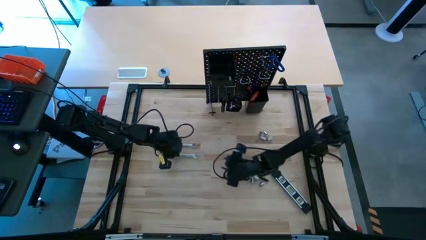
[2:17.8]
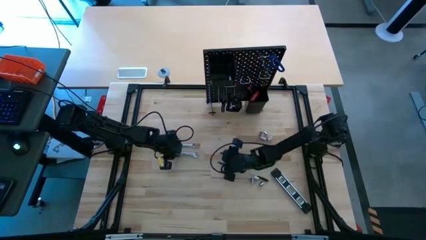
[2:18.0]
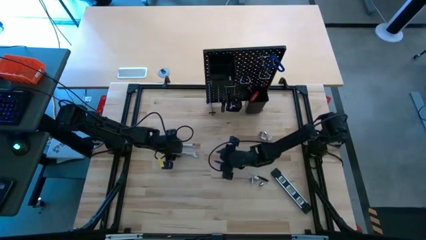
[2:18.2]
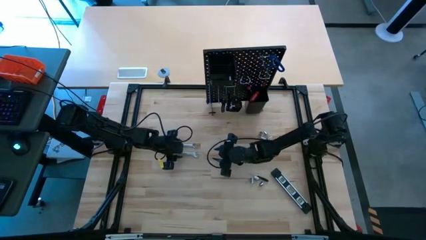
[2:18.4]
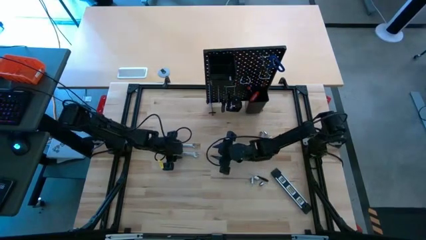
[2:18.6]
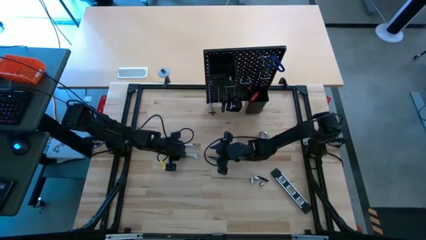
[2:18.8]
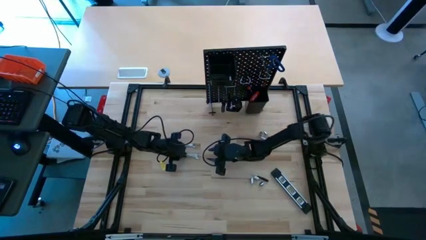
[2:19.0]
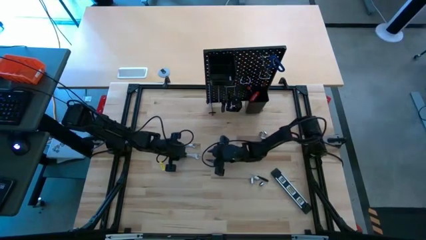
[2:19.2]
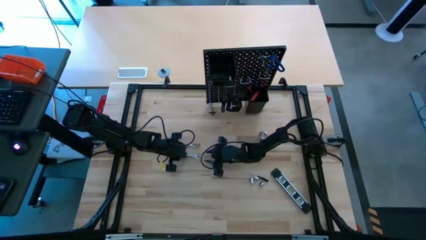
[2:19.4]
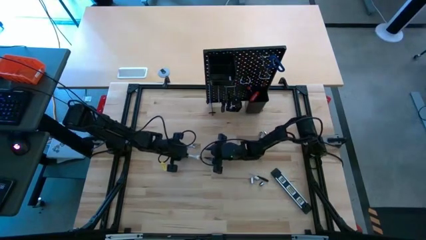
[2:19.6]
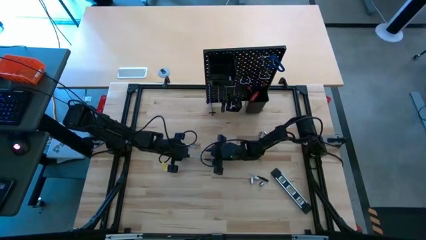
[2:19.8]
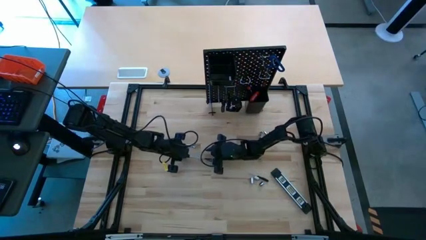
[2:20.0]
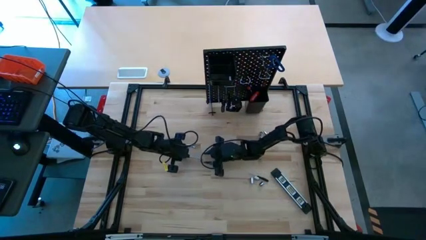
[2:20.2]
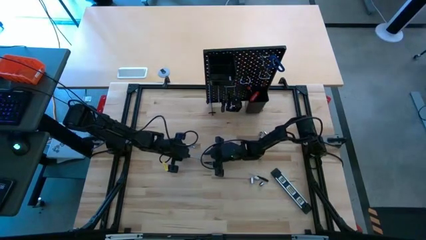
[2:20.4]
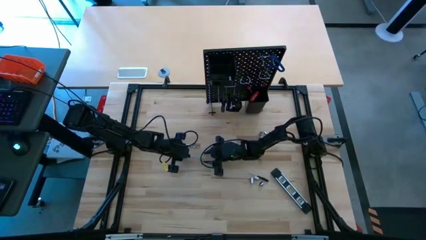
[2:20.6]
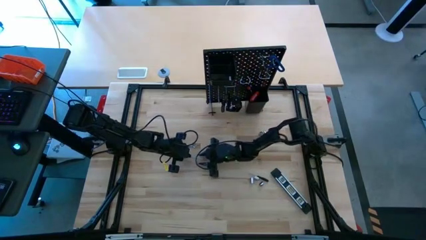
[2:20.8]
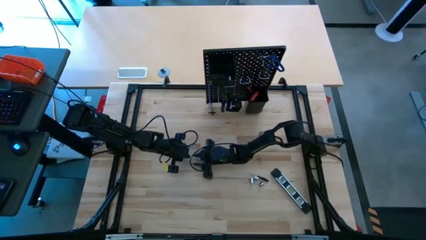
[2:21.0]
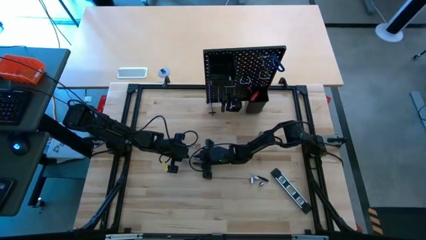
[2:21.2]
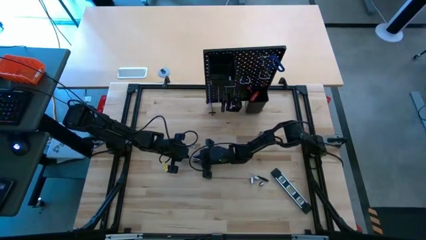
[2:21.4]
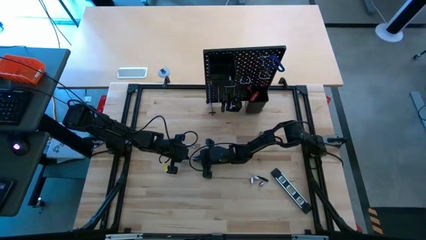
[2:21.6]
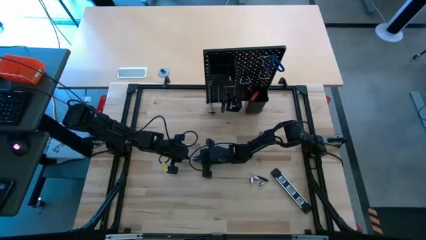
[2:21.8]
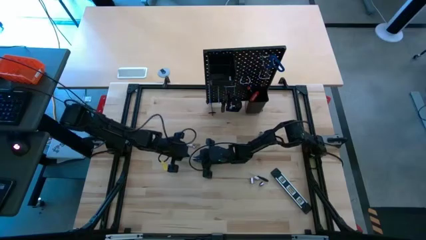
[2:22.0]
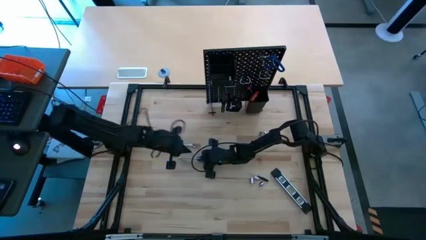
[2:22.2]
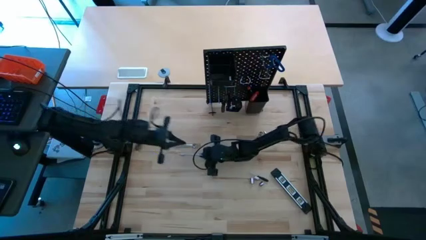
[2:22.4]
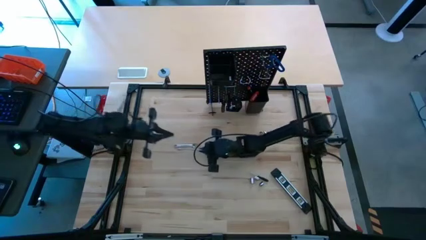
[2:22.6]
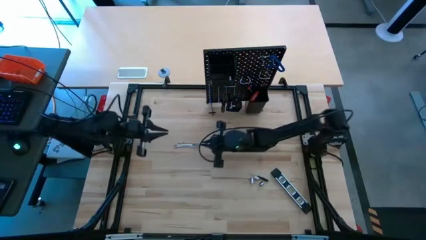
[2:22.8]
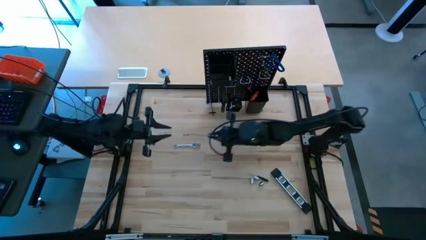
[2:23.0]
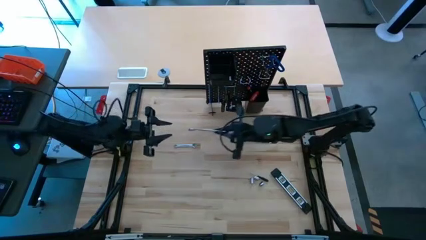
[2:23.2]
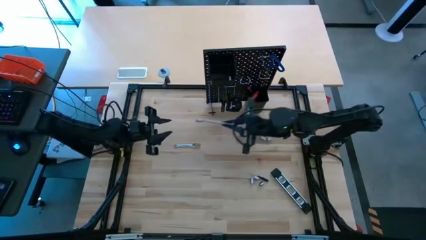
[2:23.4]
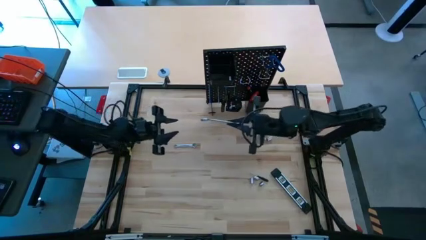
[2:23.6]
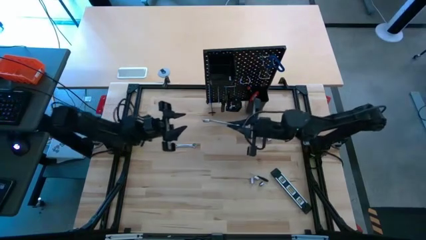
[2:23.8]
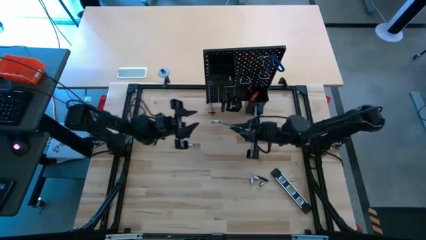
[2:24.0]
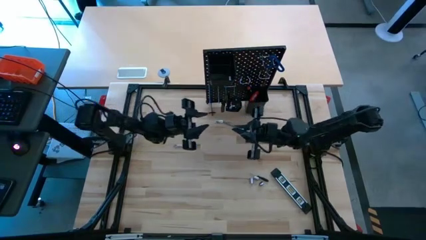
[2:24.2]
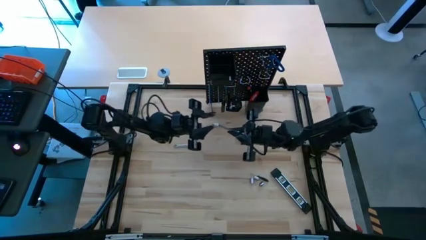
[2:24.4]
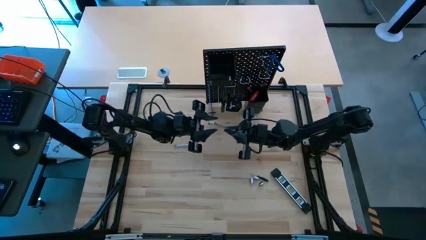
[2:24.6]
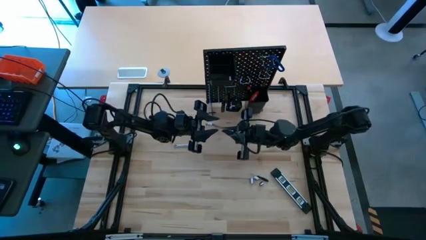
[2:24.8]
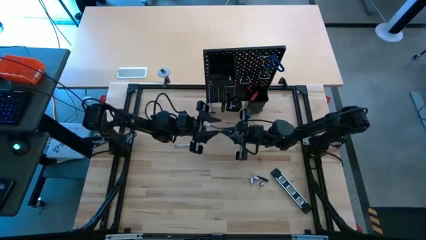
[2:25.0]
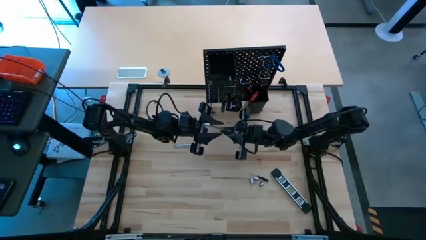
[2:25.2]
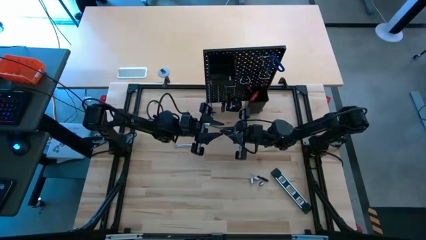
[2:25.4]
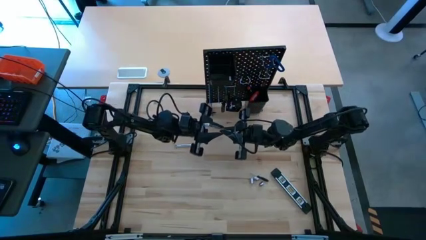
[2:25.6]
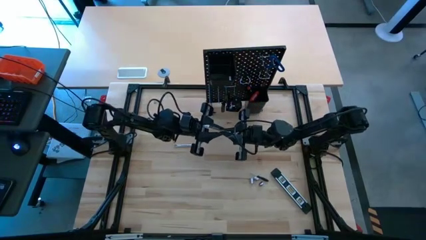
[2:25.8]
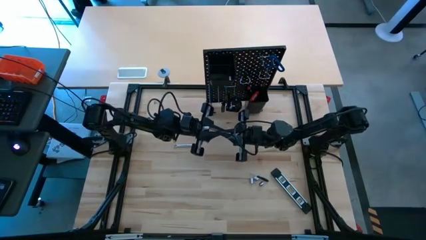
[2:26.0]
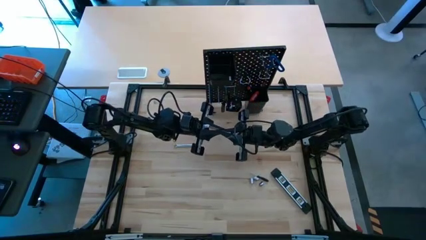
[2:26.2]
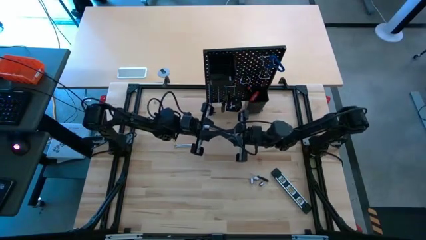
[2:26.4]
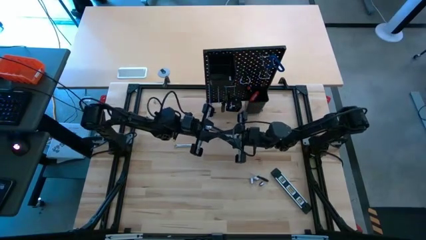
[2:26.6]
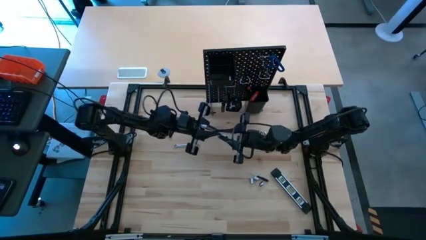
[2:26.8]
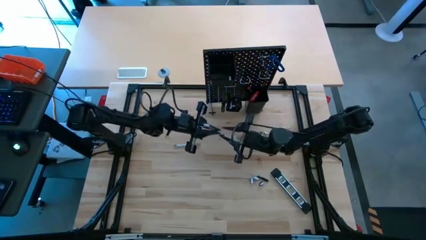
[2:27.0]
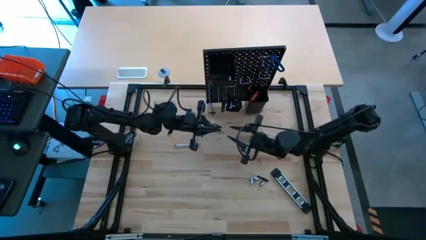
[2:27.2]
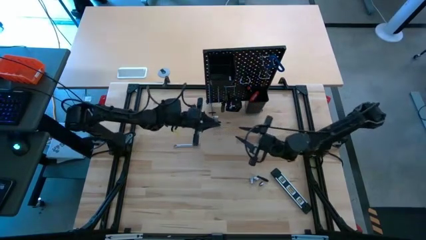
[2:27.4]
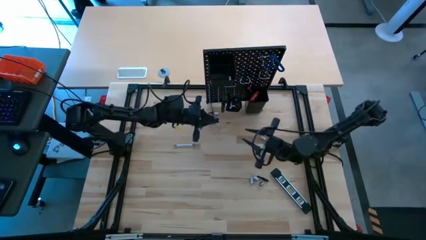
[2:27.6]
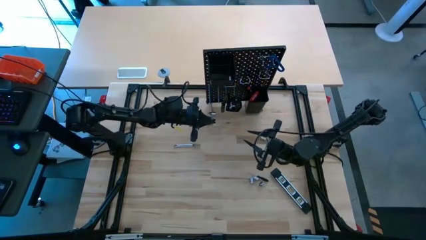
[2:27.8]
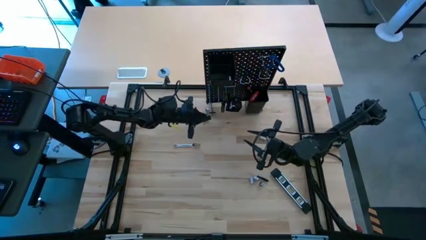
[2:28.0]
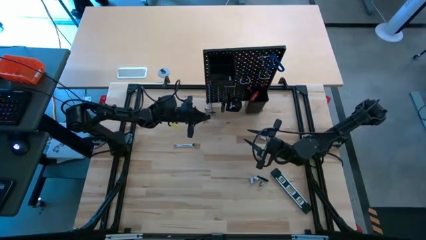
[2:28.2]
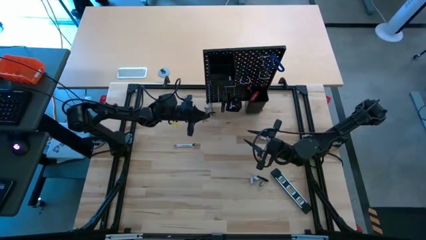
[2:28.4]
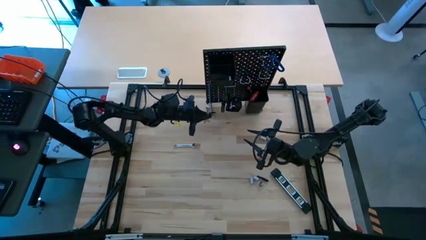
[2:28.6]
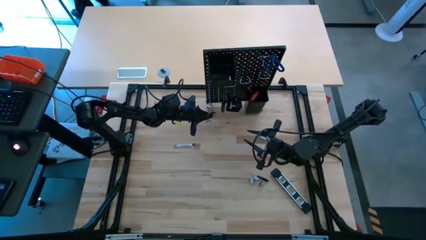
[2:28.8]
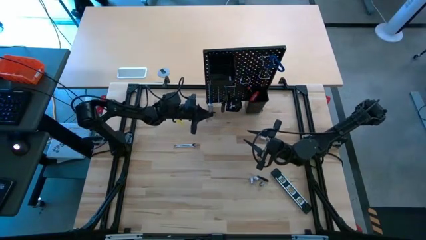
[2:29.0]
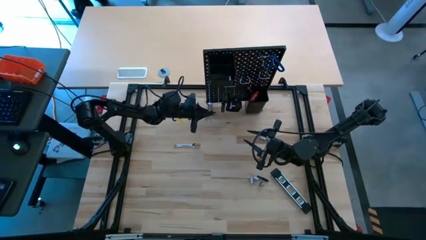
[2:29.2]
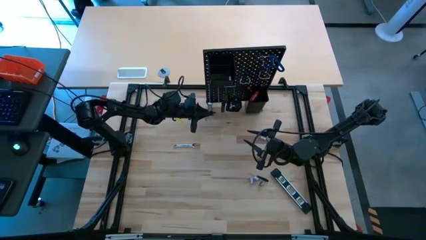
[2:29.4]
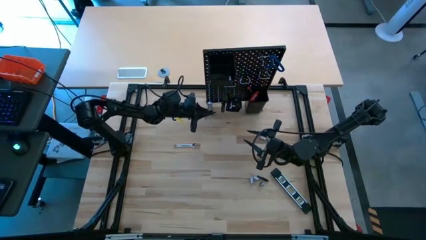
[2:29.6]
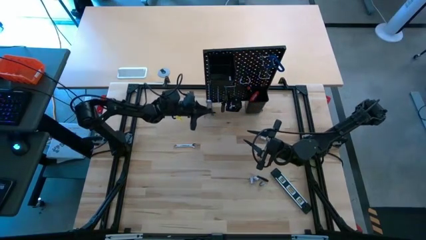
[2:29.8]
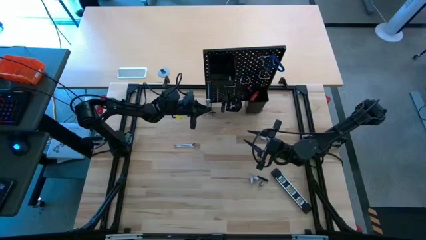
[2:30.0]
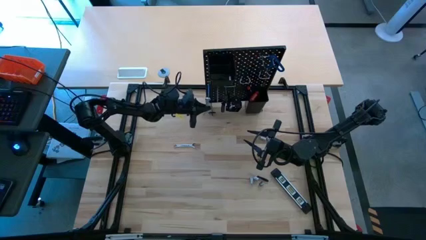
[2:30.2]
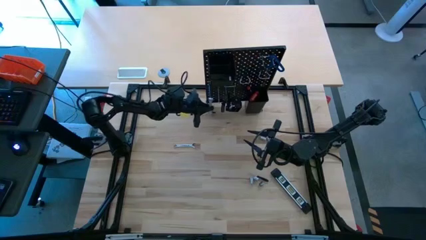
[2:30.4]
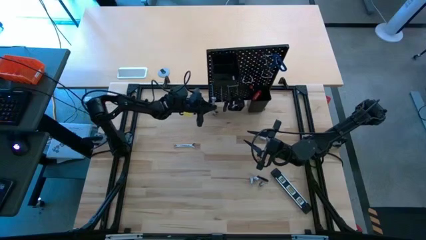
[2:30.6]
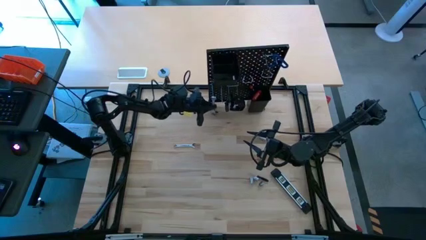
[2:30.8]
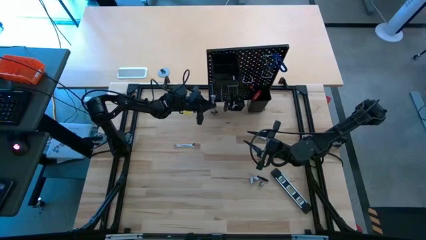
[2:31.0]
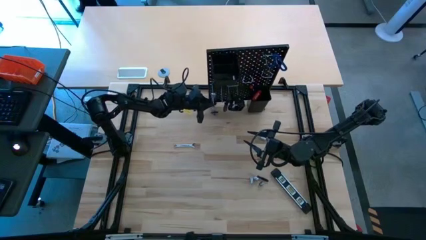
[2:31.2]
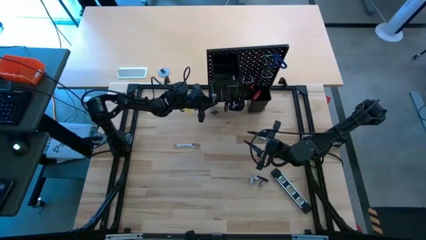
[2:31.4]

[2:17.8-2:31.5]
Task: Hang tools onto peg board
Hang the silver wrench on the peg board

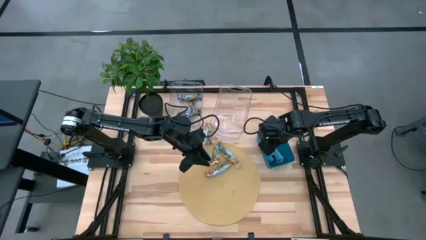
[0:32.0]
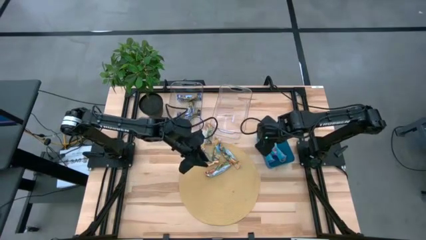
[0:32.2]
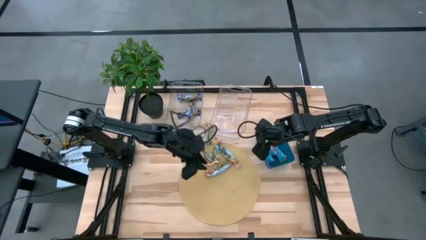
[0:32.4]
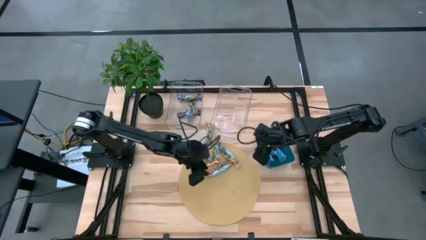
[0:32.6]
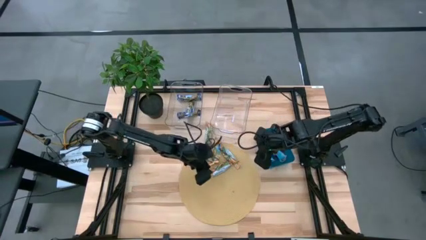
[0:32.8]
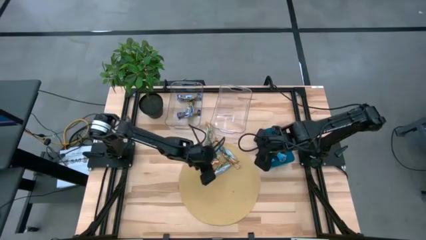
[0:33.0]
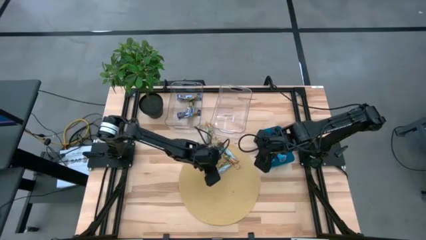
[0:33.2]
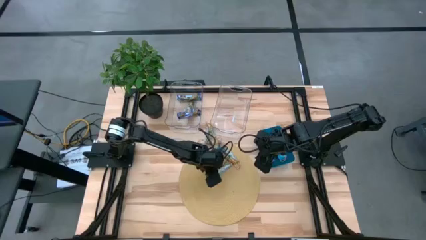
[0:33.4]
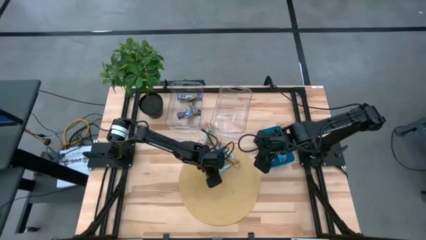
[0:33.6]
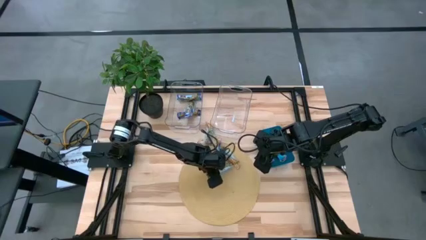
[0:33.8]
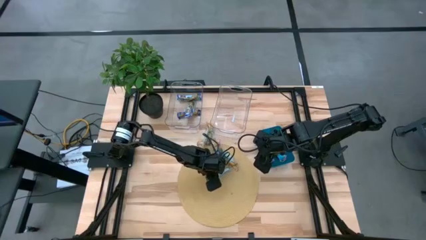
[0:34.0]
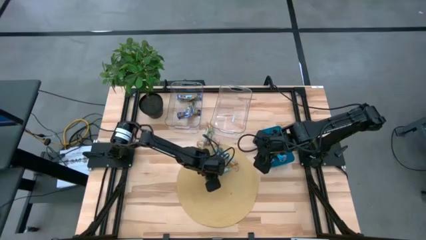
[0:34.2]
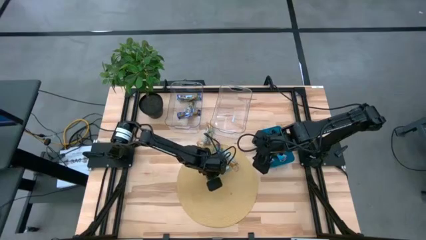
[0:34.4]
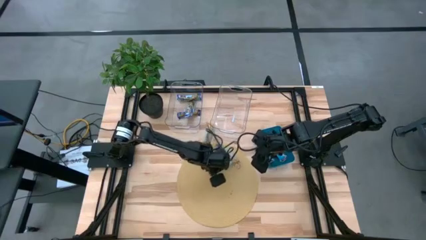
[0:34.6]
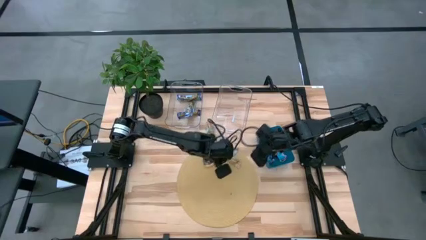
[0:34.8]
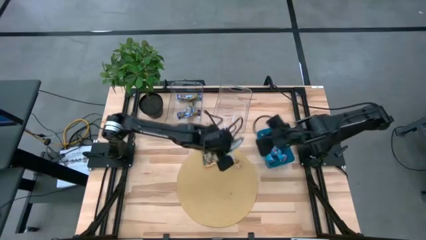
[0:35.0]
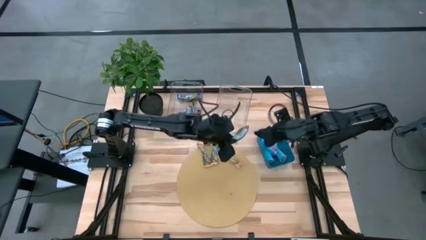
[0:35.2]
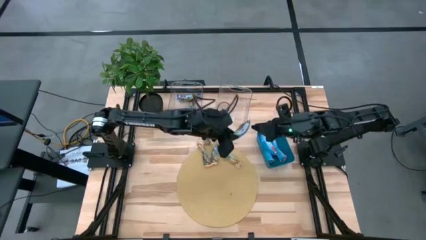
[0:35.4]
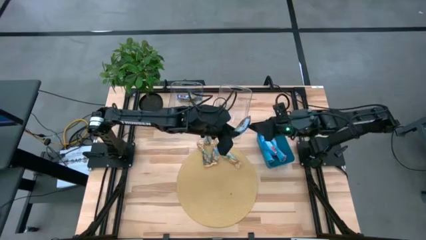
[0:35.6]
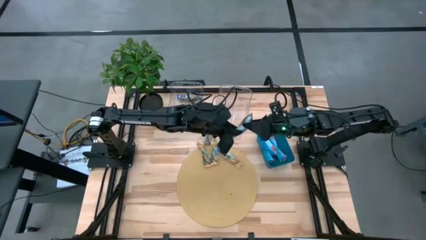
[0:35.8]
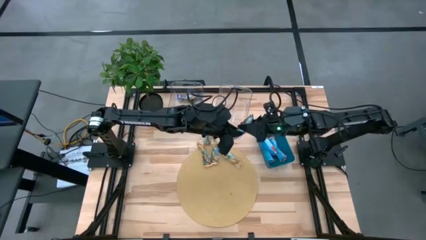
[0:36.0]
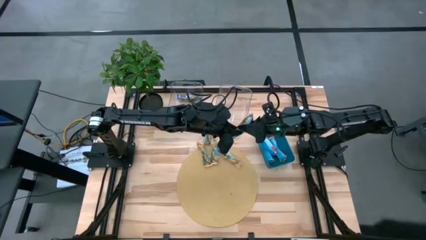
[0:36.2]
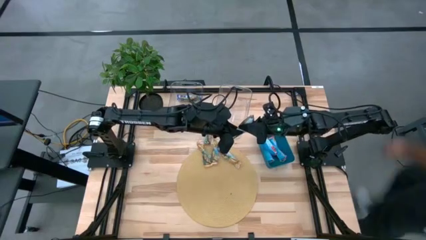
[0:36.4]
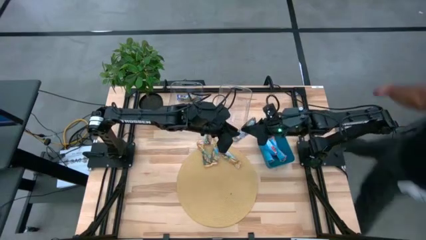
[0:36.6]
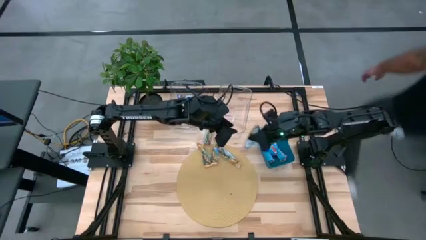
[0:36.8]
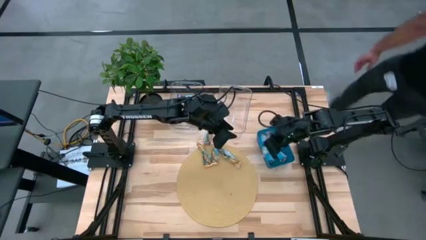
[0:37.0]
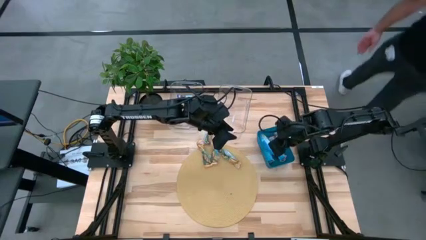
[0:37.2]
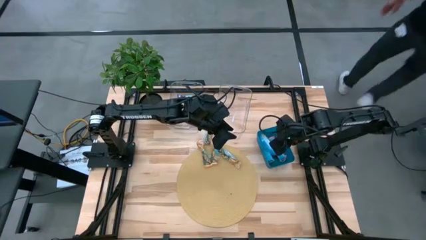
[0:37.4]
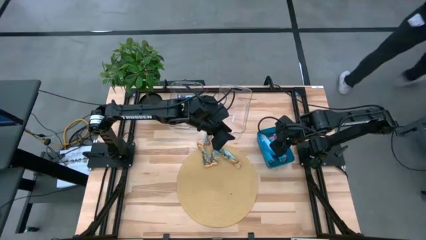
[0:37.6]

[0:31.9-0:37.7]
Task: Pick and place Granola Bars by type
Put the red granola bar into the blue transparent bin
